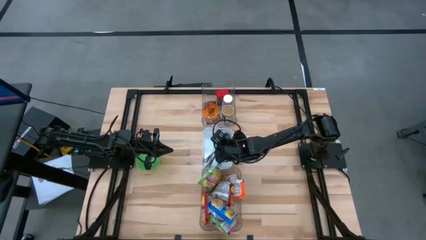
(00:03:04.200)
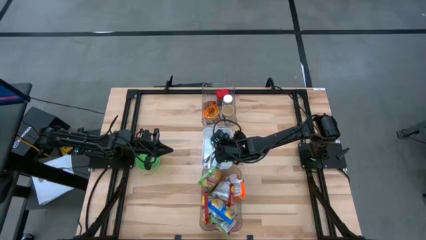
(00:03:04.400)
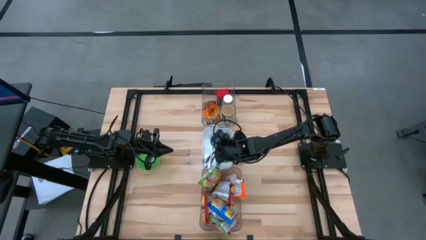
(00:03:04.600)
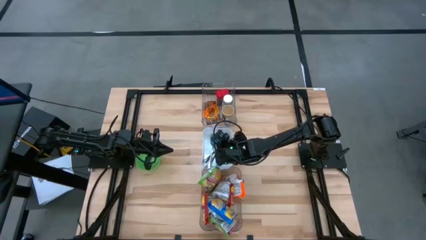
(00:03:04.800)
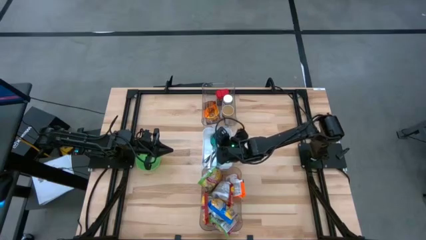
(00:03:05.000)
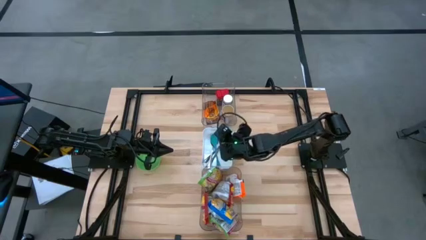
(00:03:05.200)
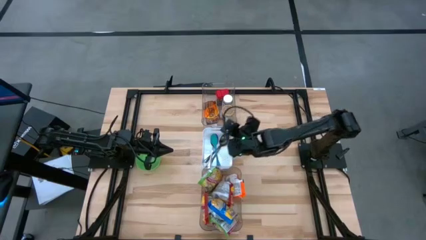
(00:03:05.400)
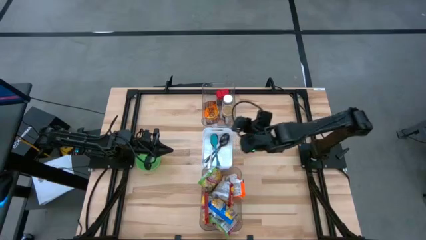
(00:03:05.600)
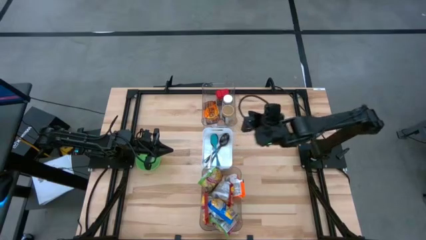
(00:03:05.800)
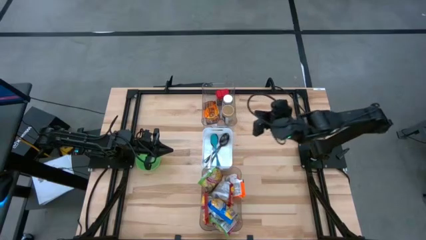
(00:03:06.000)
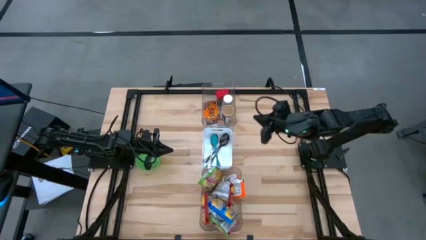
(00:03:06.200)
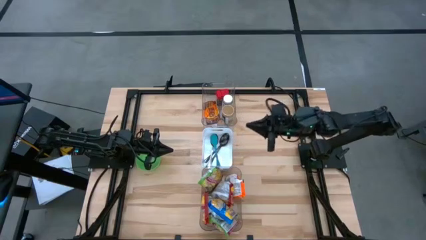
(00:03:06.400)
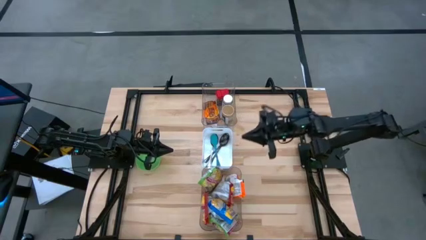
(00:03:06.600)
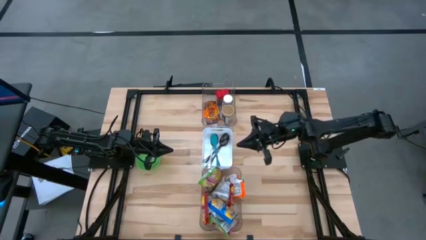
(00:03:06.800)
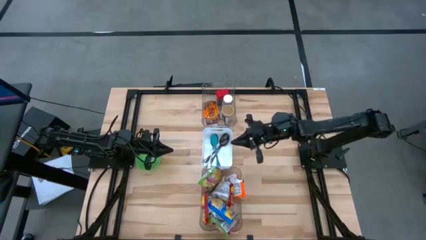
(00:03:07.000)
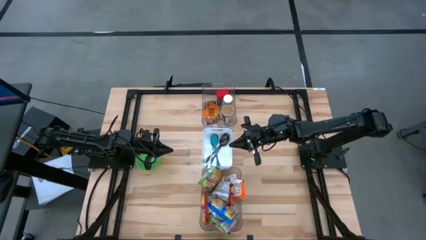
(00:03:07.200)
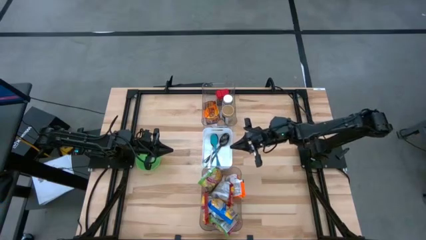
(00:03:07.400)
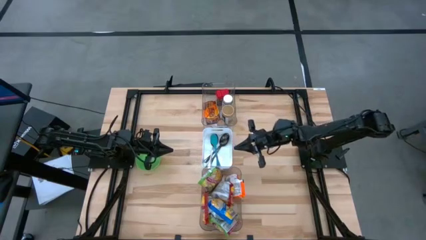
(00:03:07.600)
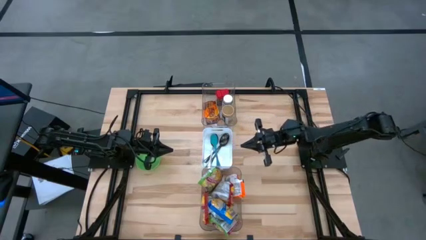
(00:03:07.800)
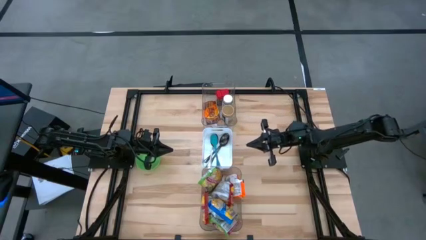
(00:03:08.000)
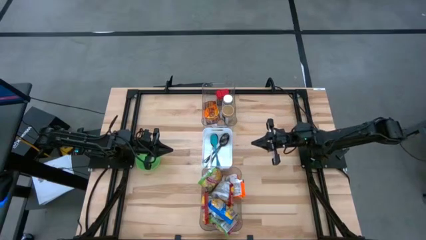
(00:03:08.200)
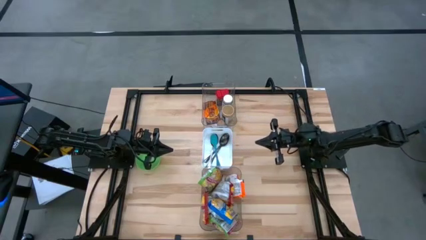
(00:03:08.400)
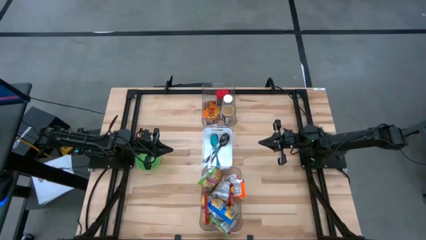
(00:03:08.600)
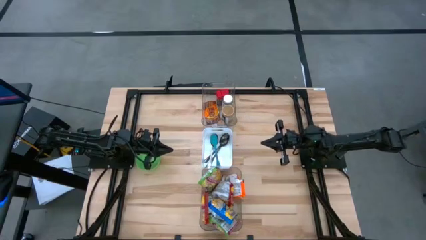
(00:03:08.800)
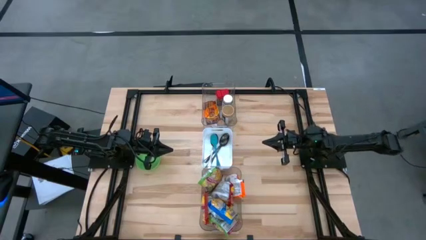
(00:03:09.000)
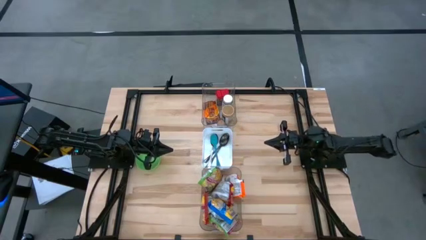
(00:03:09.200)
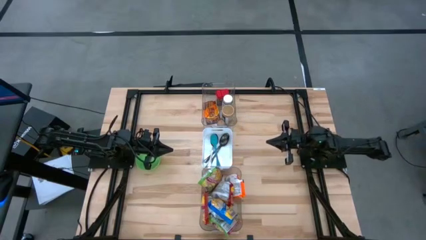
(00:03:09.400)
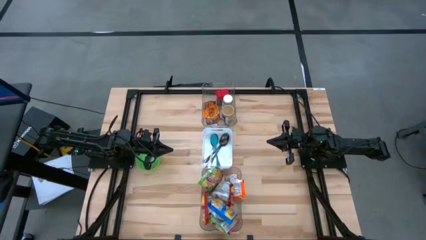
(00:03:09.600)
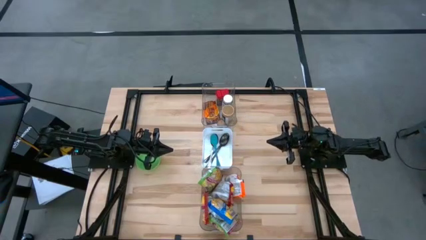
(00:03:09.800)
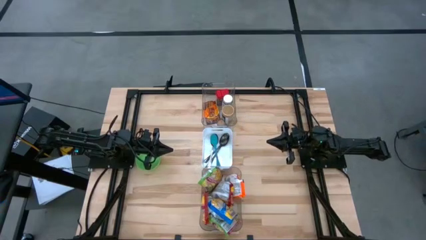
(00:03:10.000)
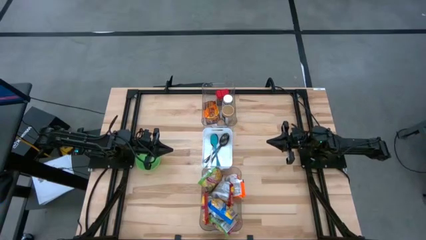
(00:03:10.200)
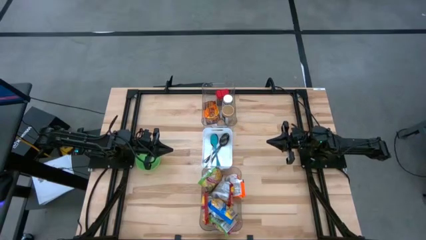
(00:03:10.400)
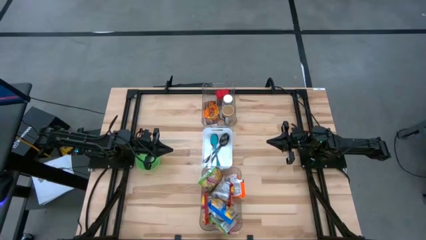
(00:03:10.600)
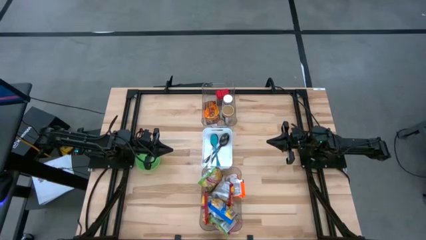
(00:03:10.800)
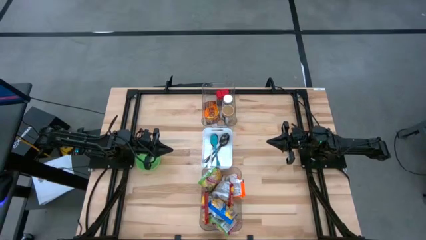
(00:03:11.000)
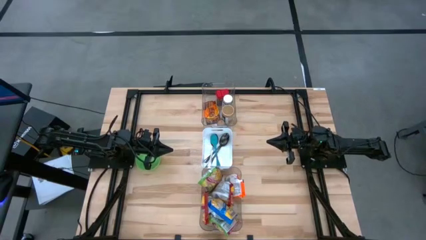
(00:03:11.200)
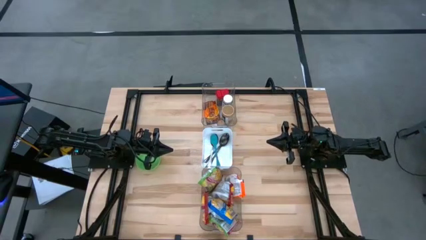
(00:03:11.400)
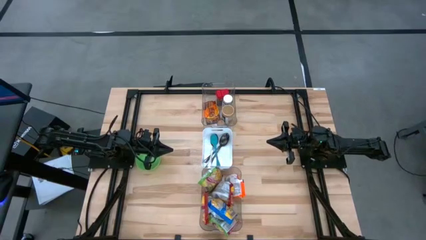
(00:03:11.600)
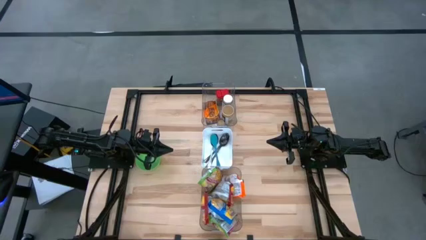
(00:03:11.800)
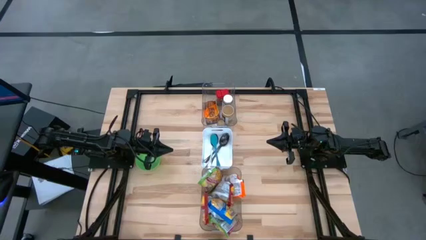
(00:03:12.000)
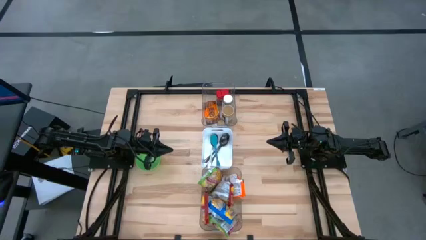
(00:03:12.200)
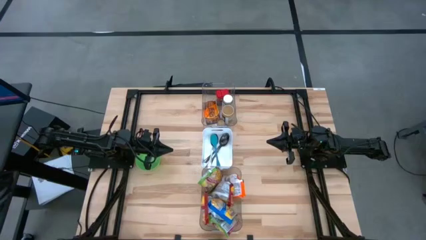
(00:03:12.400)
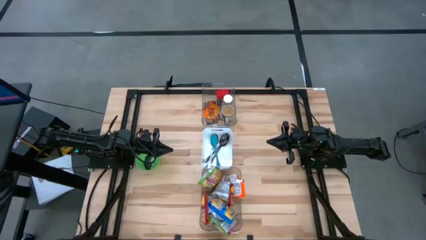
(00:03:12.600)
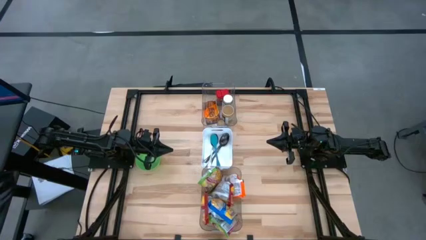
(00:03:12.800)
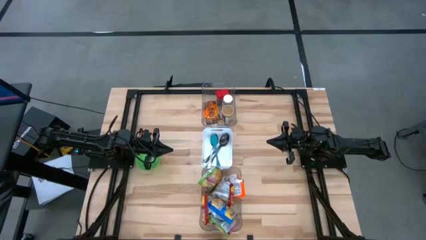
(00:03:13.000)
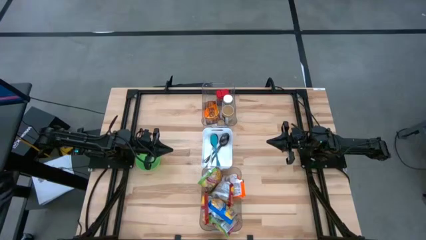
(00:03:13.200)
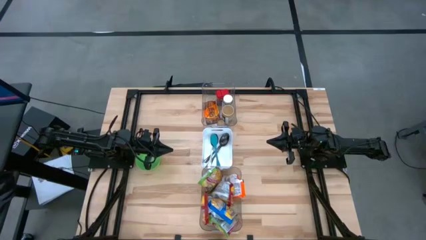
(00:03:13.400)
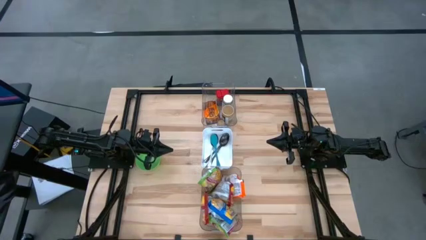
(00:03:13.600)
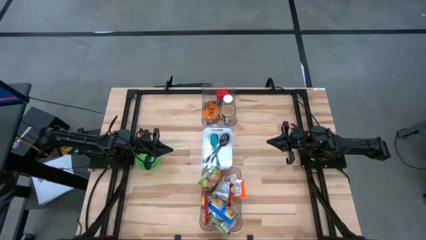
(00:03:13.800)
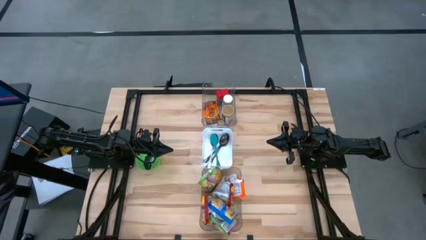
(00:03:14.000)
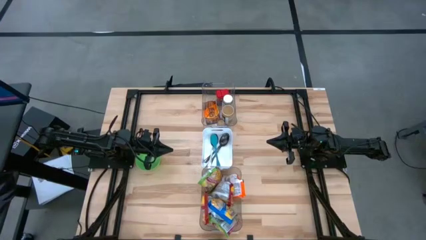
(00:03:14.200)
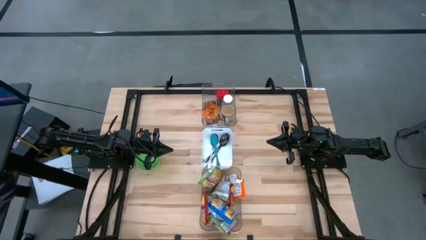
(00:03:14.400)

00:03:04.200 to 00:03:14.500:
Task: Pick & Place Food Item
Return to Home Position

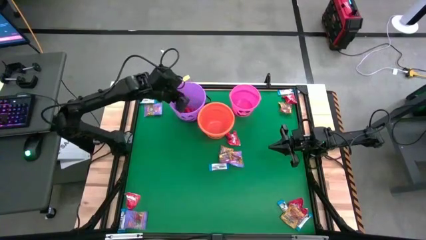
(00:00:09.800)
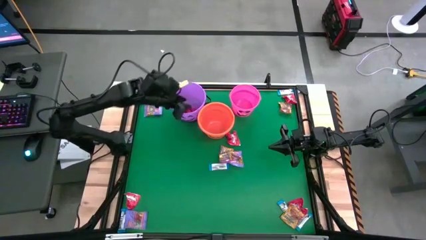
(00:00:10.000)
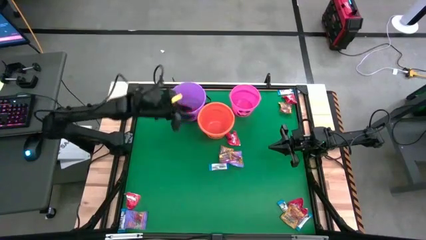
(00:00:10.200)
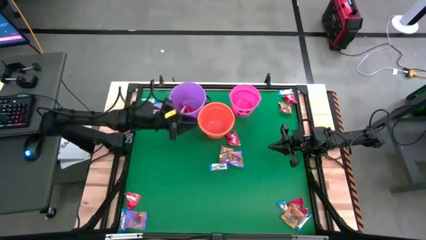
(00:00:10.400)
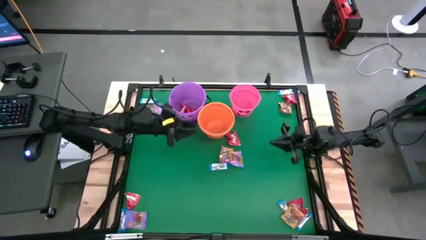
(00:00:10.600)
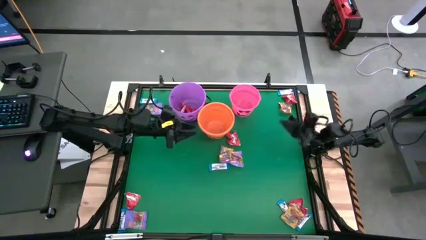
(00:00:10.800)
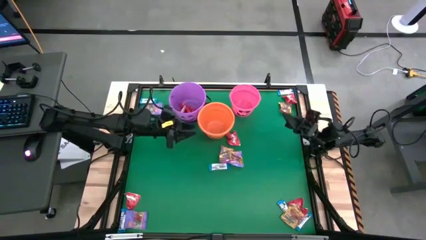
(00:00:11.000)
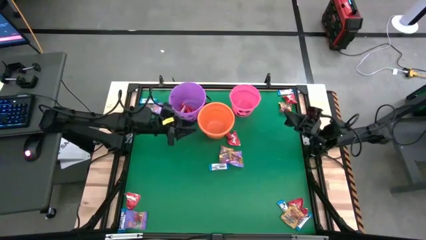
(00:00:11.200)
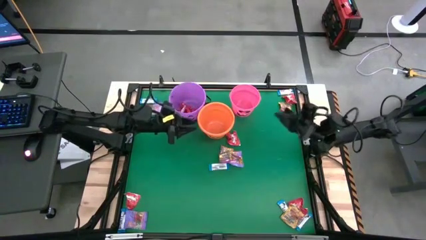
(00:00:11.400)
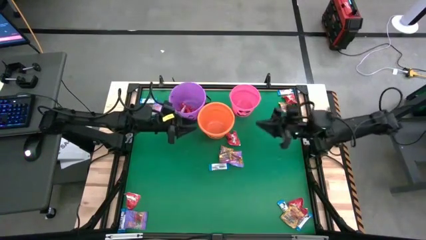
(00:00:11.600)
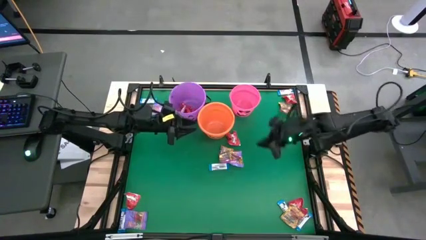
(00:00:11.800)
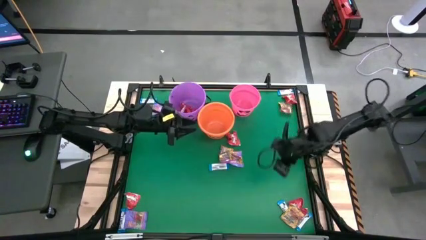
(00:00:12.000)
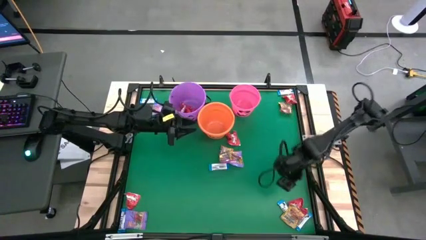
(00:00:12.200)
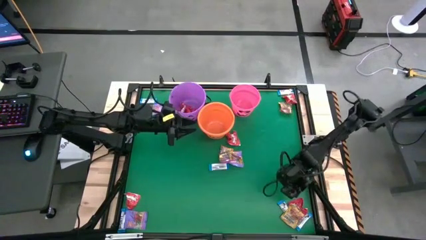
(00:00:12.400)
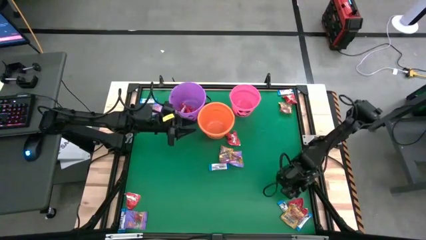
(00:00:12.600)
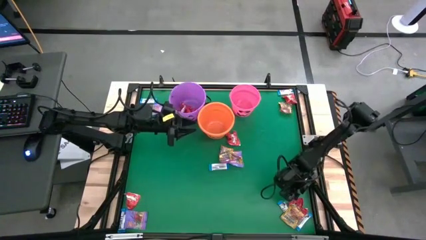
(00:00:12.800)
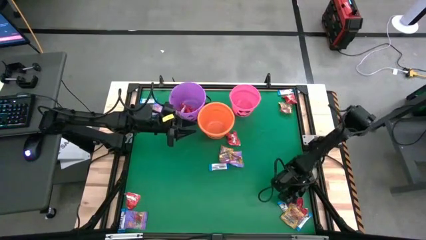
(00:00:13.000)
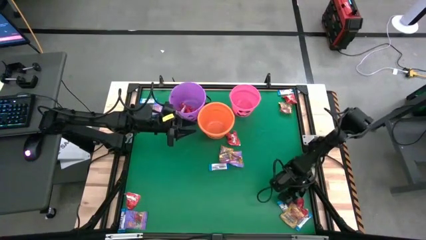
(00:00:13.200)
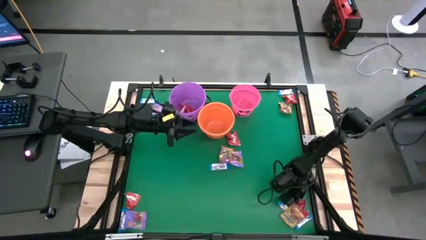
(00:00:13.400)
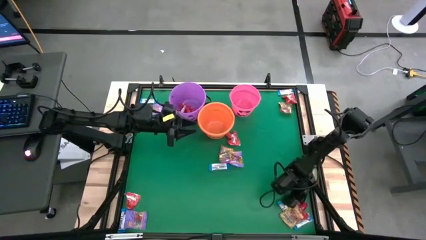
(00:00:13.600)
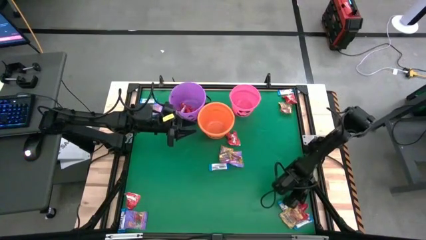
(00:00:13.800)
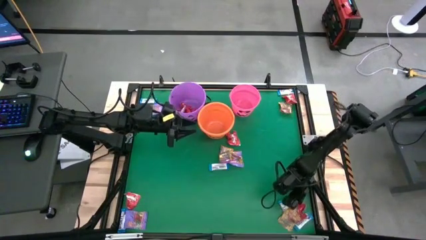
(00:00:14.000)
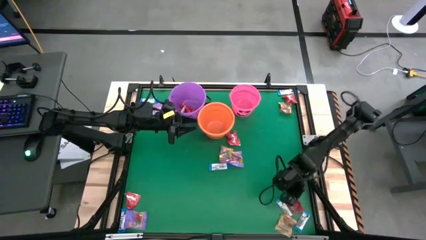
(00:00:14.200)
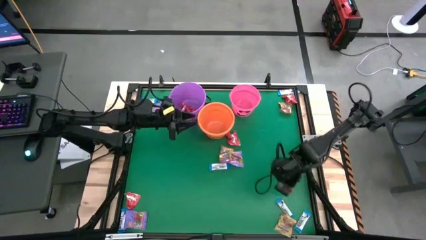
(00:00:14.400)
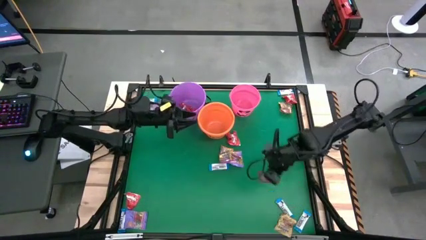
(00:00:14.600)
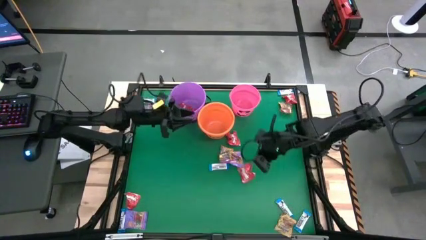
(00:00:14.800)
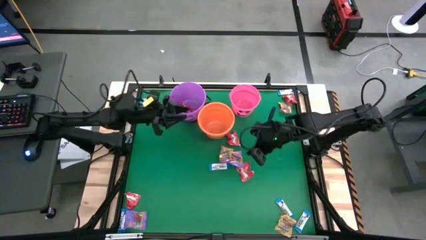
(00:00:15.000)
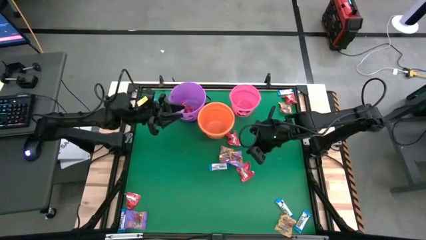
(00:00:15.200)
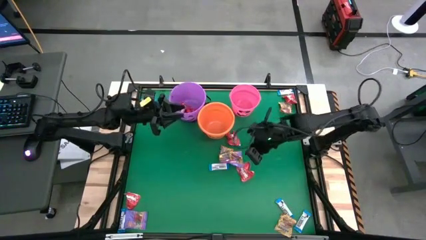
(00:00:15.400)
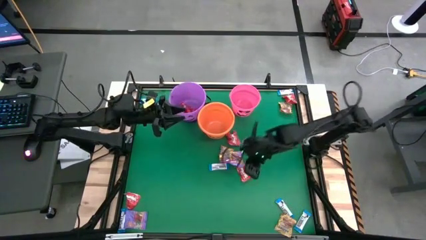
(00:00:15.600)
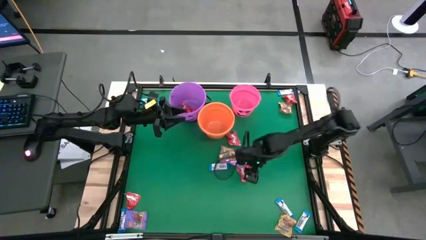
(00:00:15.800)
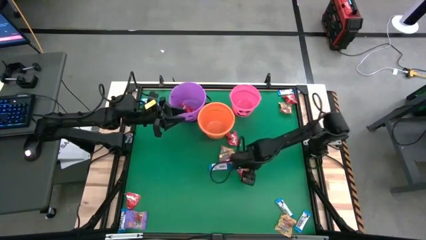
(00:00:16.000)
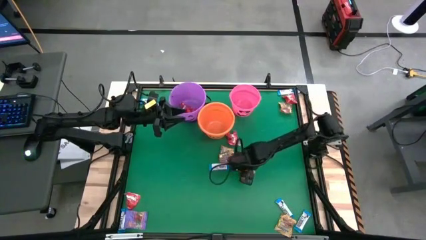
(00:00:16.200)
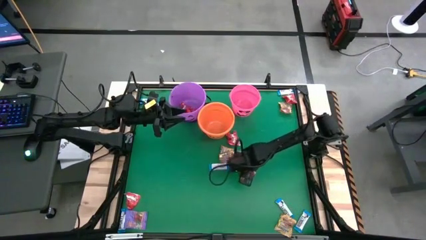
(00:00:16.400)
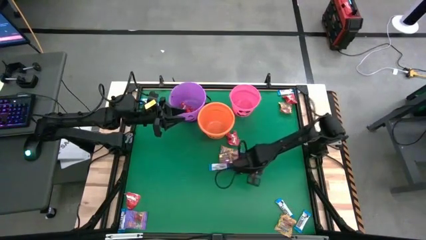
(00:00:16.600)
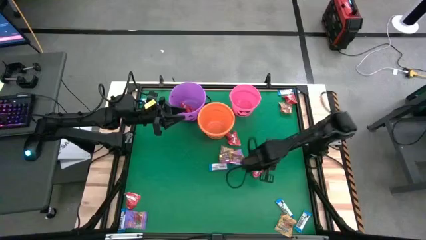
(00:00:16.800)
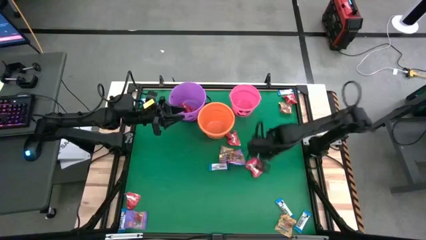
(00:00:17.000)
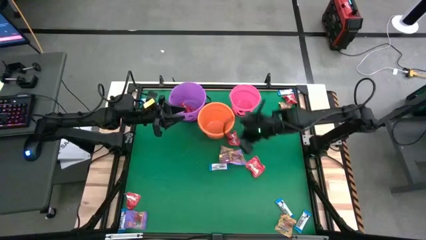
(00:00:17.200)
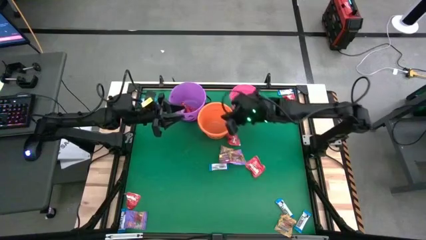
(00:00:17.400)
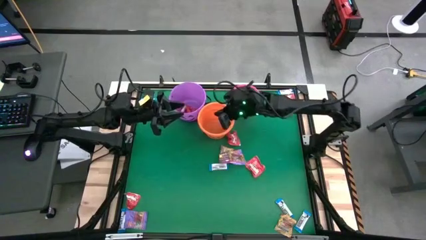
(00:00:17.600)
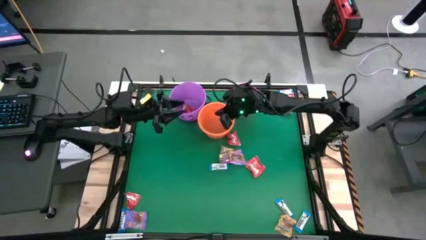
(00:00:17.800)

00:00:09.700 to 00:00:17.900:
Task: Sort candy by brand, put in halloween buckets
Put the red candy into the purple bin
